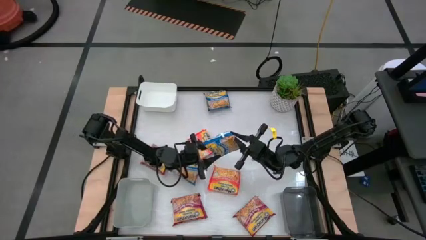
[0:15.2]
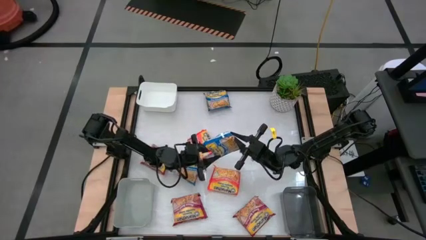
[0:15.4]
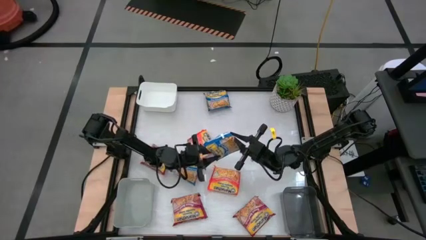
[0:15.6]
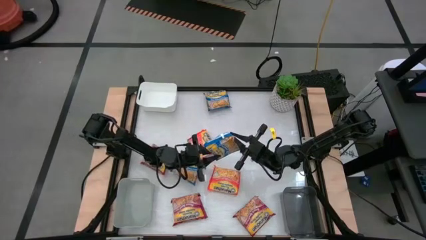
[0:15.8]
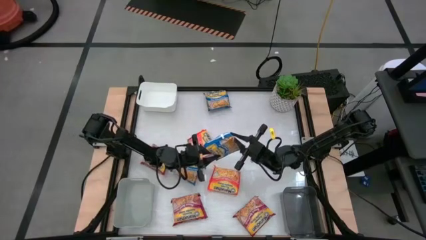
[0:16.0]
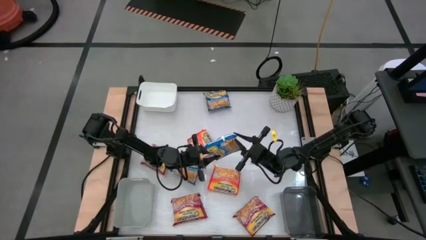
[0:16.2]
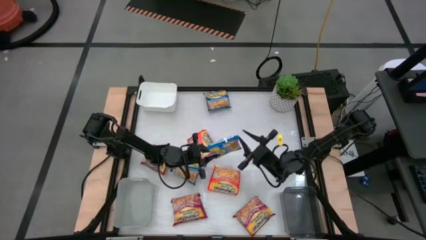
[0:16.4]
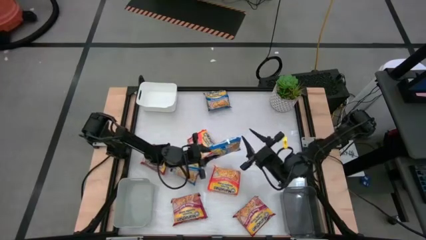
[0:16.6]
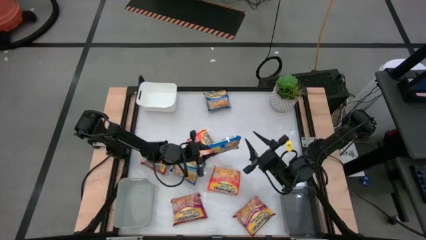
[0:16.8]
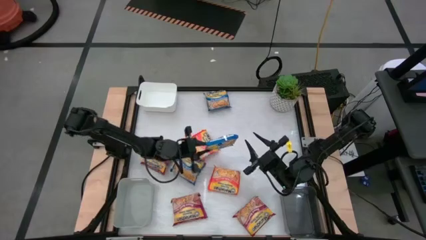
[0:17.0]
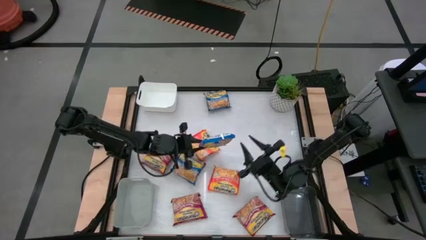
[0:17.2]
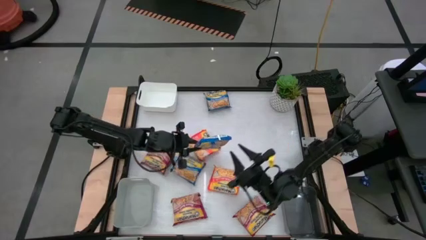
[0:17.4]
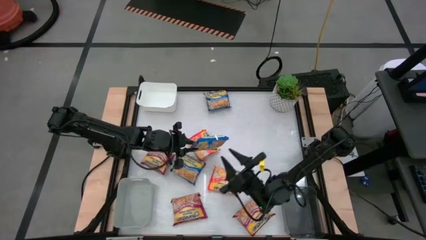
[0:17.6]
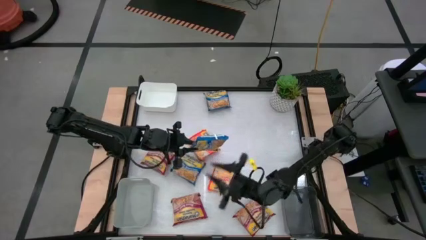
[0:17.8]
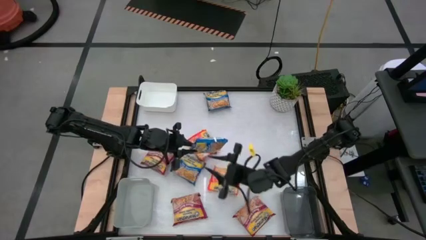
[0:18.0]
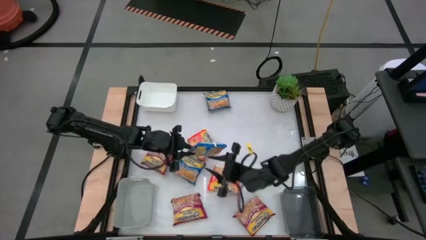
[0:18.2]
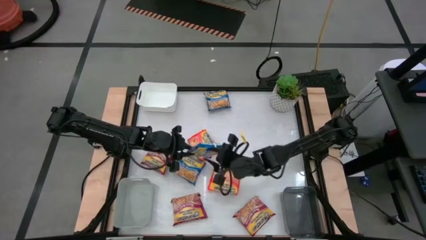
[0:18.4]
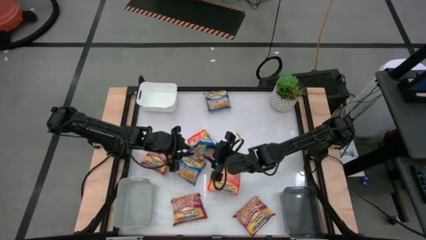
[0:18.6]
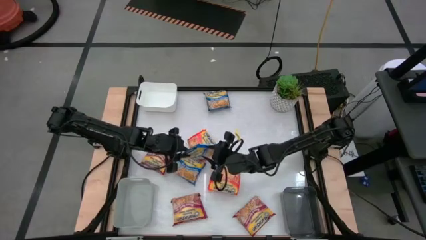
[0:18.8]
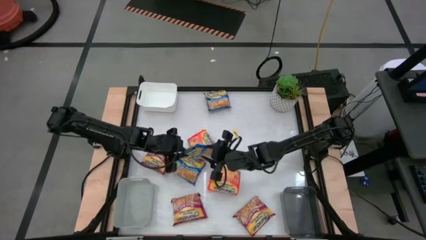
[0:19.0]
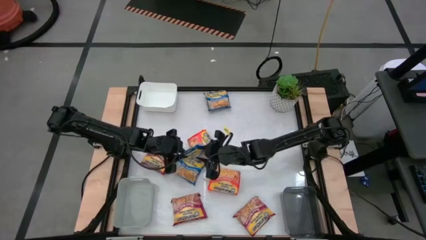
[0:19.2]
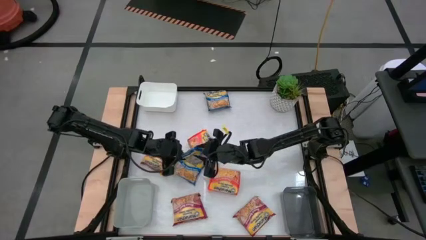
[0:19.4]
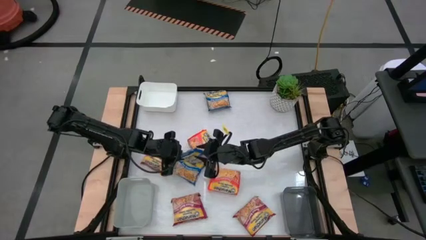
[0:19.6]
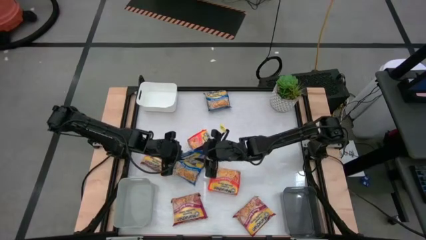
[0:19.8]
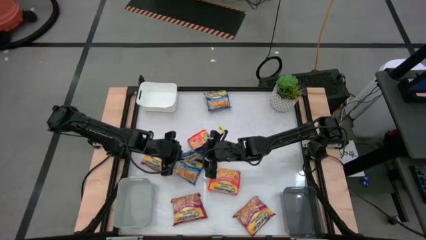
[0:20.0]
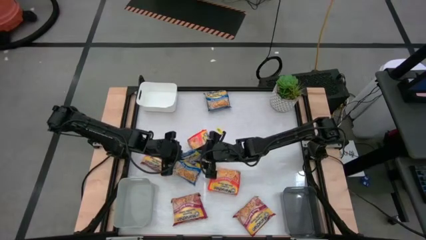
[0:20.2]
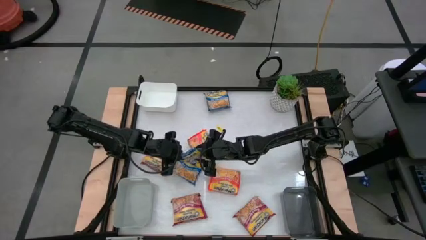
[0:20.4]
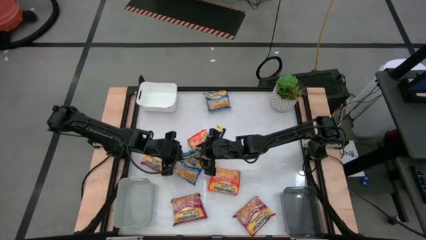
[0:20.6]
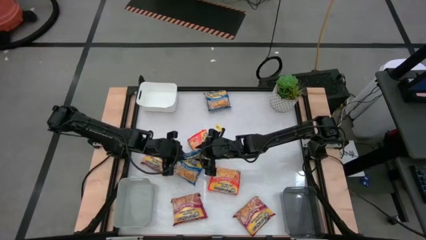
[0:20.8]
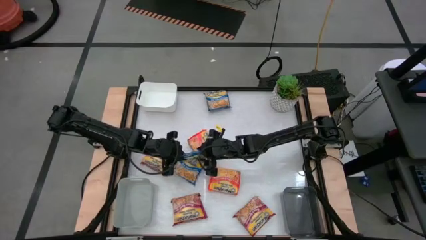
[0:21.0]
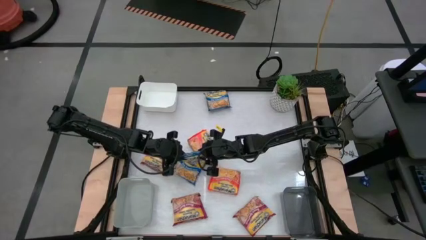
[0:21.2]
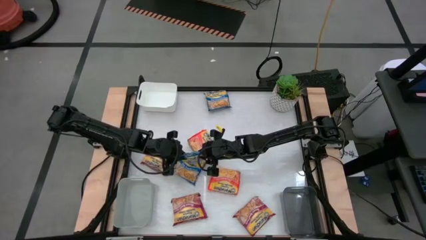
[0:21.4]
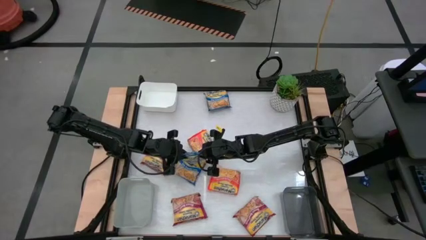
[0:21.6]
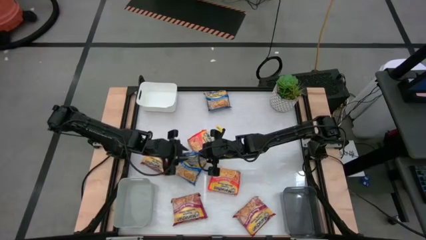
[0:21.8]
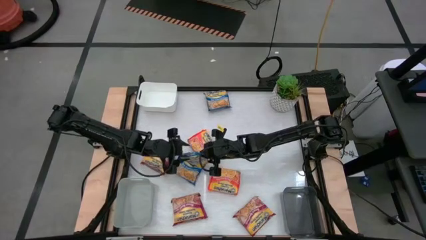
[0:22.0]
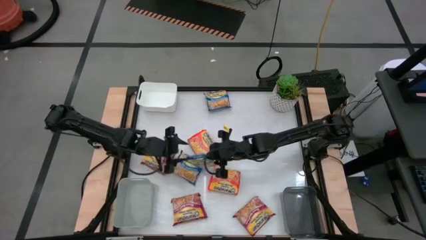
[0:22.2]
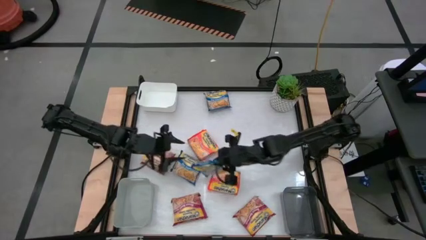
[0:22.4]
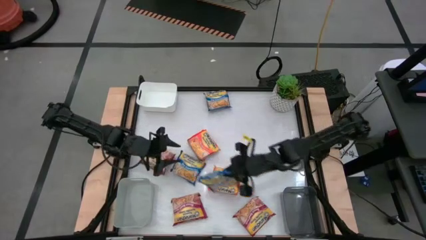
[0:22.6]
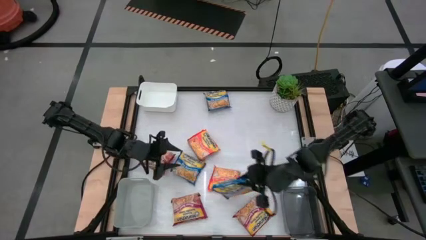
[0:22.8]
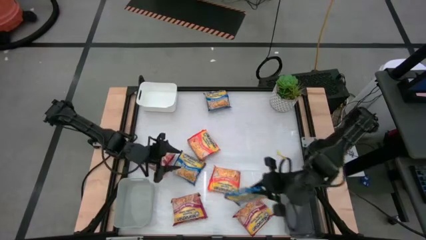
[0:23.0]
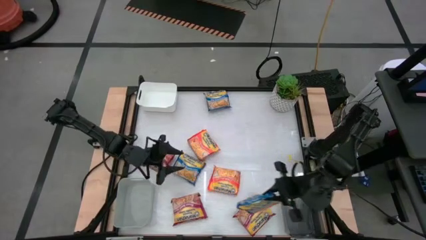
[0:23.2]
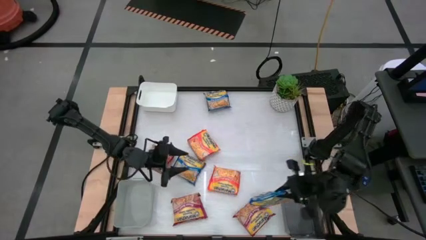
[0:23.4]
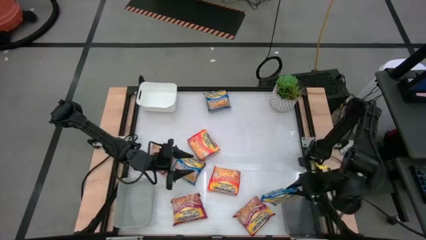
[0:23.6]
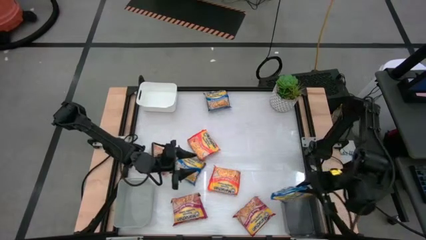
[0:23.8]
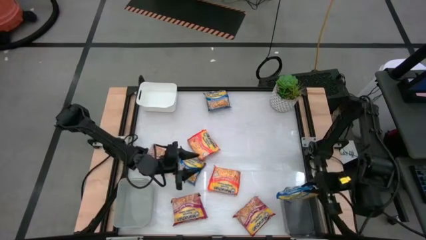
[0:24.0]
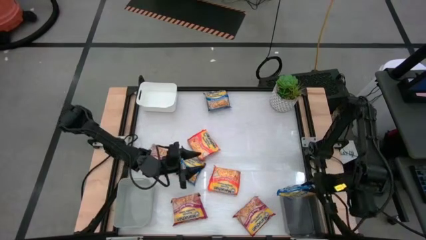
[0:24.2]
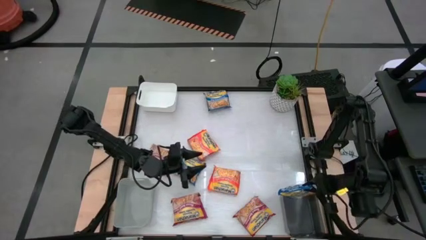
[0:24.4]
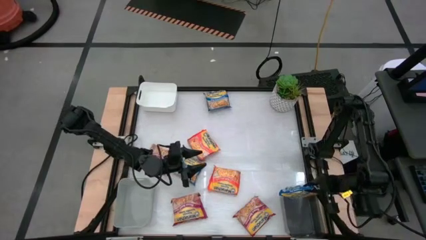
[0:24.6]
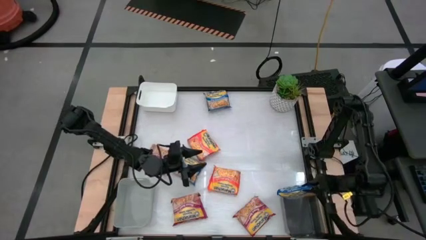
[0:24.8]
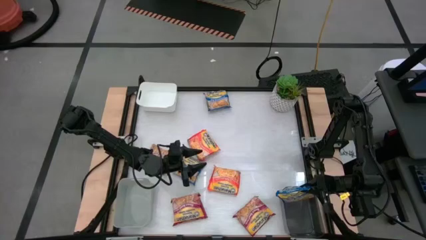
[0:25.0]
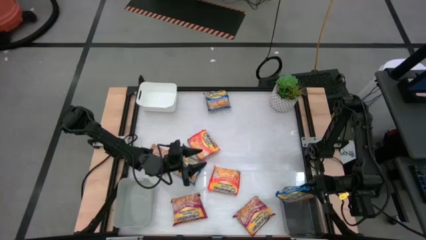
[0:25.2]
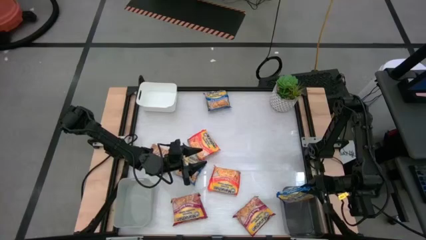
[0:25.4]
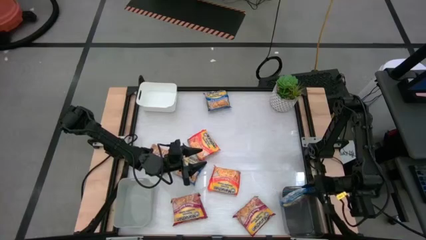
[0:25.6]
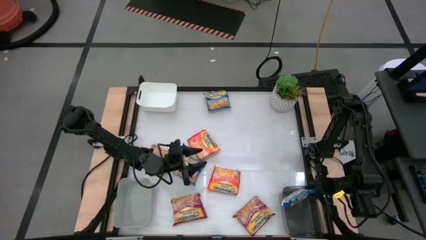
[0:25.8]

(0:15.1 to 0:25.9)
Task: Sort Maruchan noodles
Put the middle right blue noodle pack into the black bin

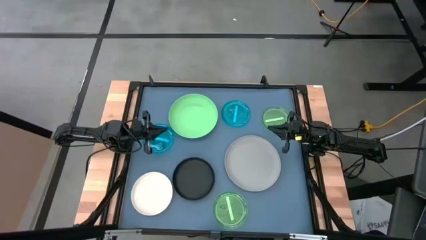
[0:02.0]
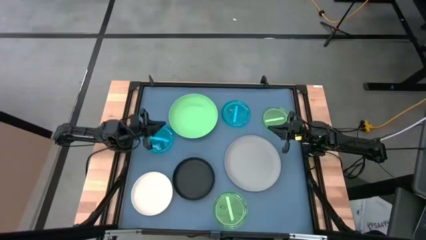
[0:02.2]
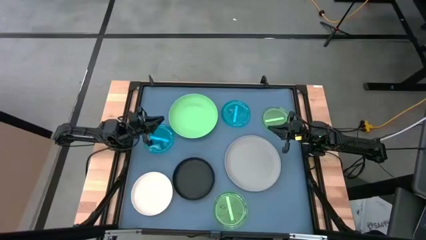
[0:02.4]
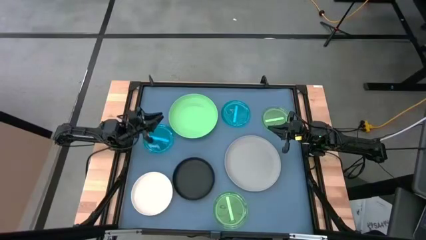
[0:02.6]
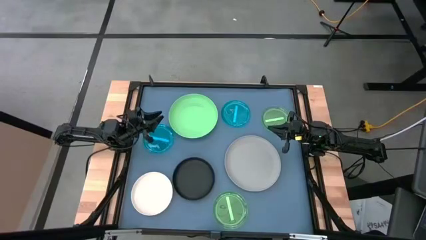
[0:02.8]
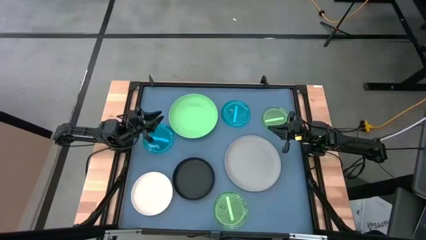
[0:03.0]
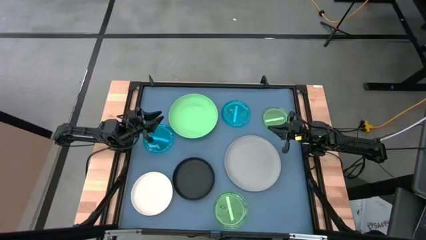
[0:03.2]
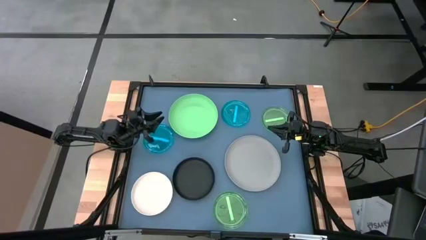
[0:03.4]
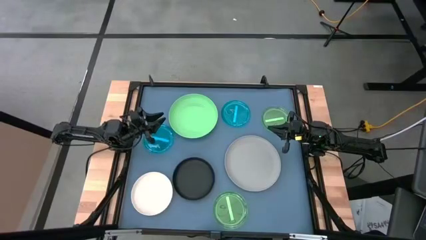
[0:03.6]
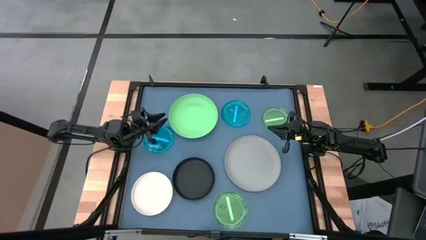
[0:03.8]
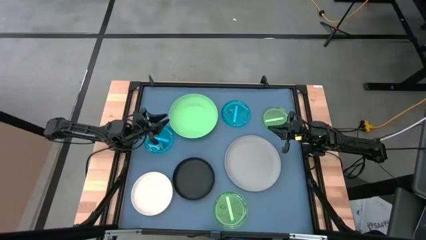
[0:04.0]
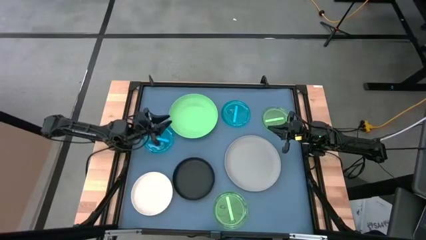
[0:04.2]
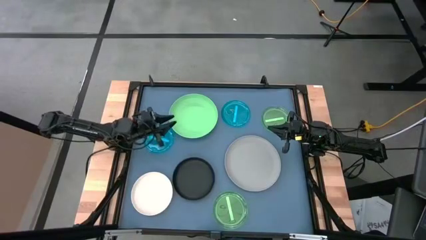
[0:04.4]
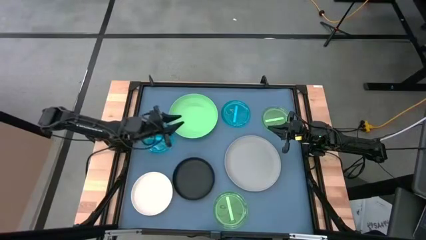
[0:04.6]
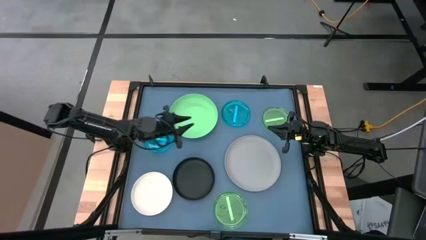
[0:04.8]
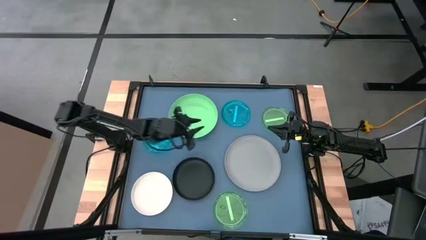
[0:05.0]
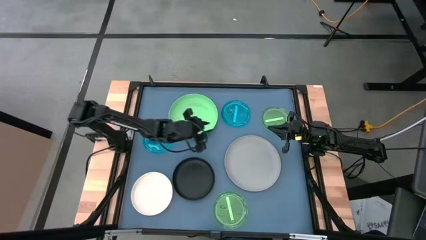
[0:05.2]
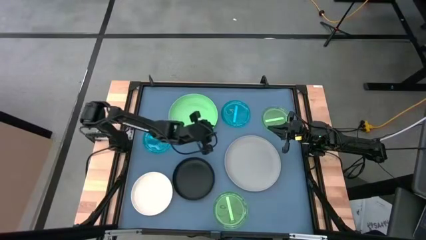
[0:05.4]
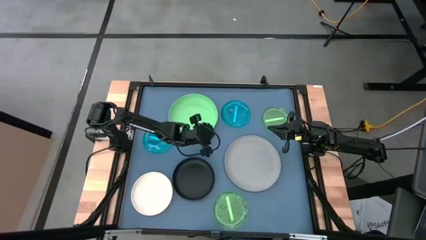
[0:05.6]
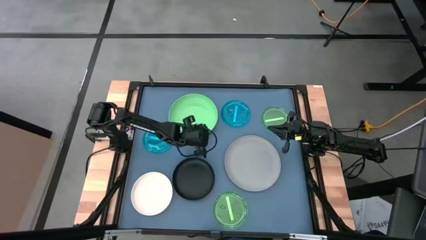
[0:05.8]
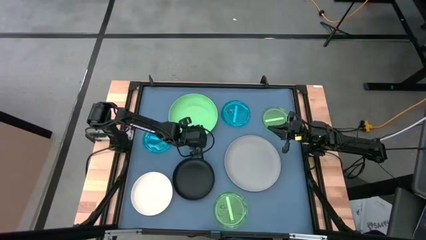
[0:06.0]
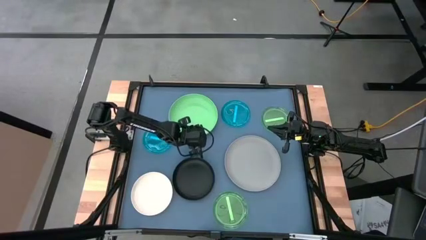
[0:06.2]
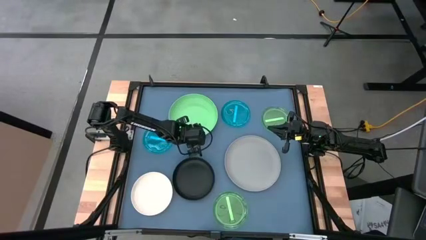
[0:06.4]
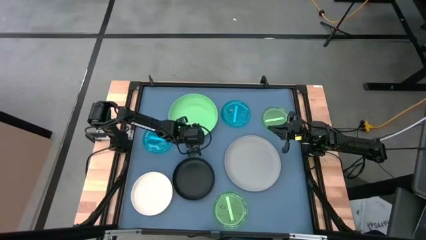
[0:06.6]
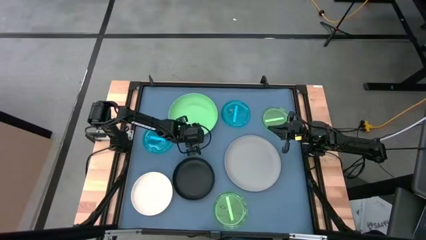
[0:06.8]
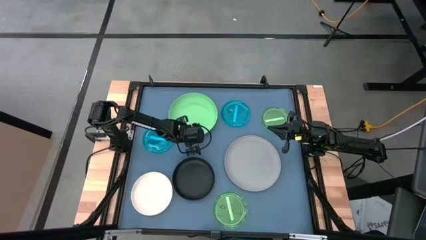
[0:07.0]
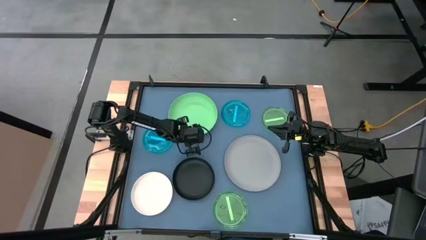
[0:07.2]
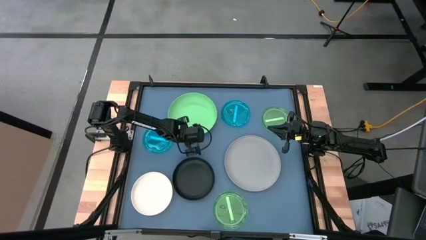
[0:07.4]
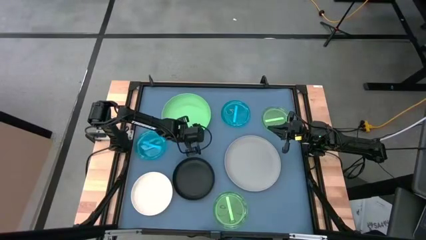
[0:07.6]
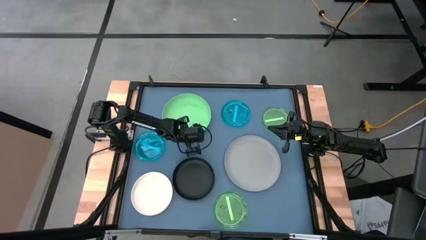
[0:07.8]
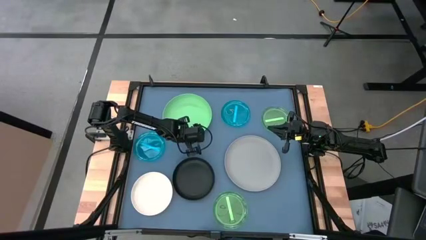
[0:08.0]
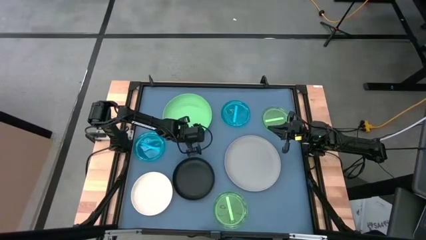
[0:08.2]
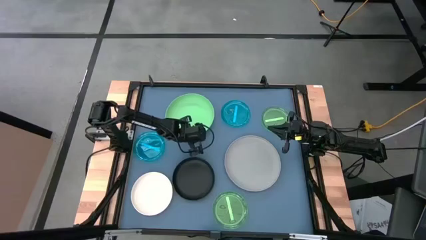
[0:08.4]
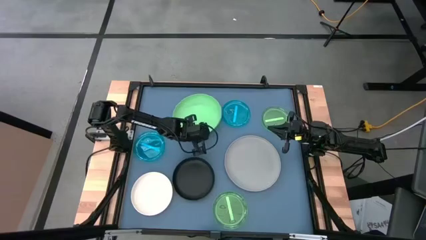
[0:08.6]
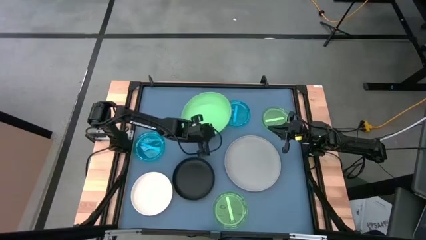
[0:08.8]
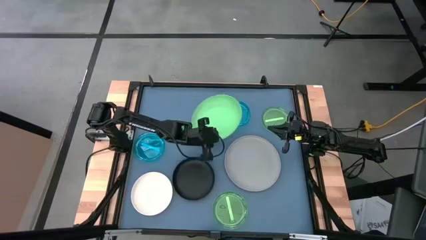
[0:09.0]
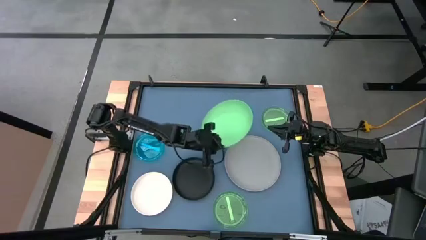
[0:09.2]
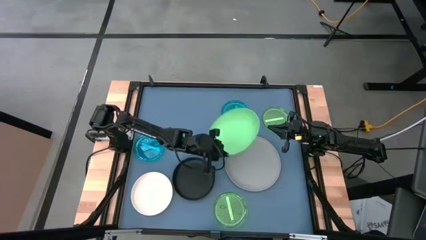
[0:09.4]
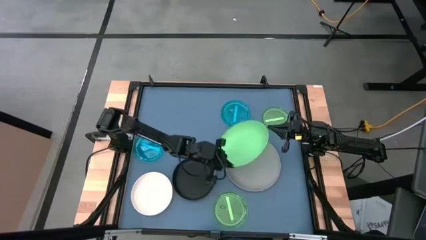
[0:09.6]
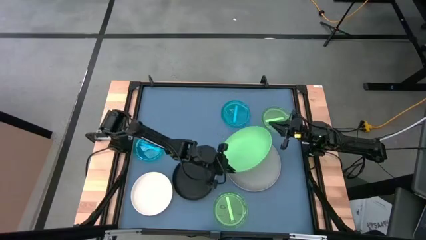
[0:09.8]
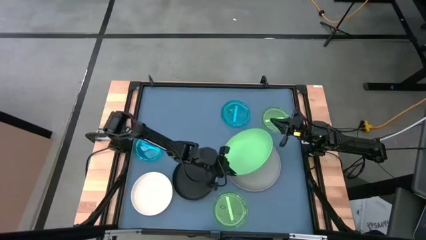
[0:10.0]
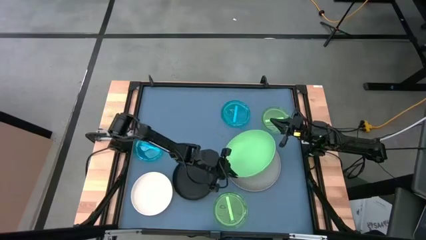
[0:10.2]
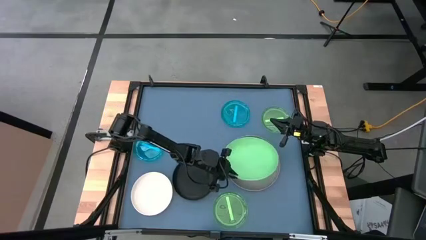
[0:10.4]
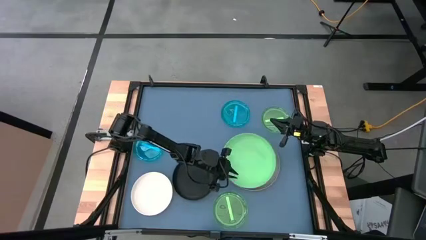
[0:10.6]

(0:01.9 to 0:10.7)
Task: Stack plastic plates
Stack the green plate on top of the gray plate
